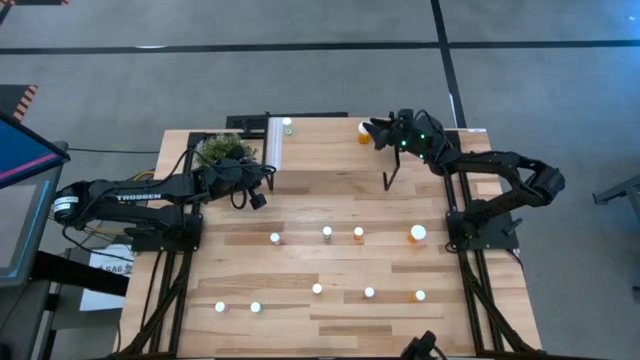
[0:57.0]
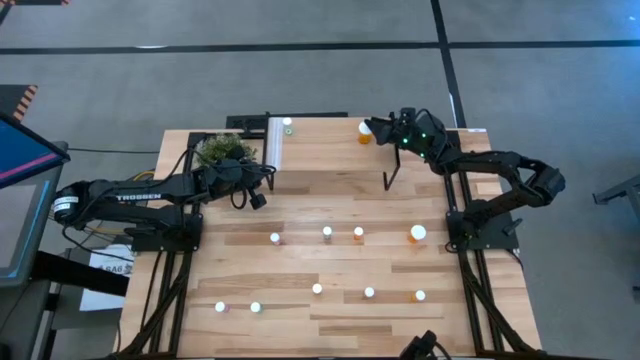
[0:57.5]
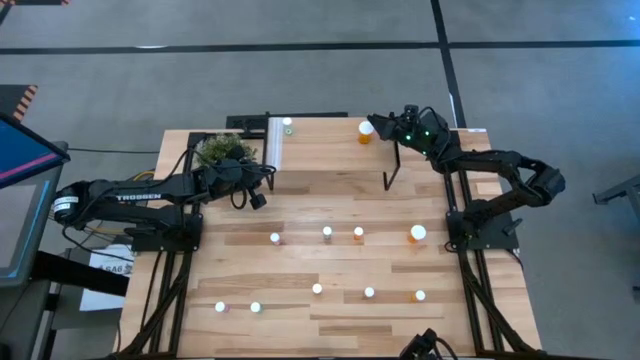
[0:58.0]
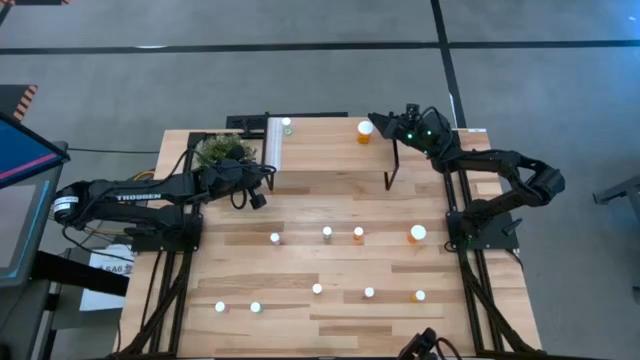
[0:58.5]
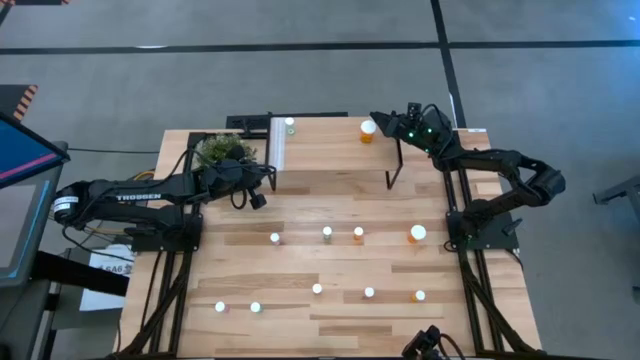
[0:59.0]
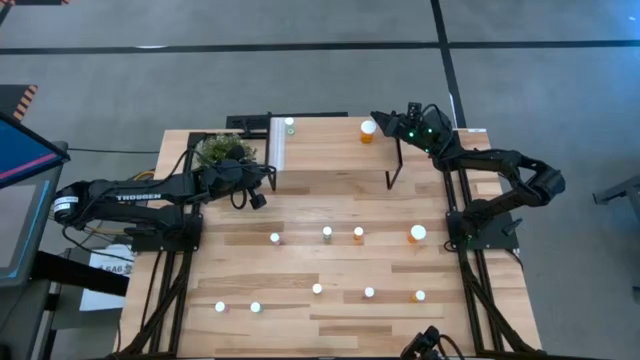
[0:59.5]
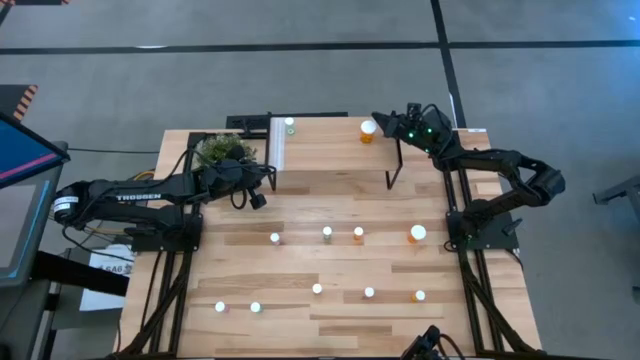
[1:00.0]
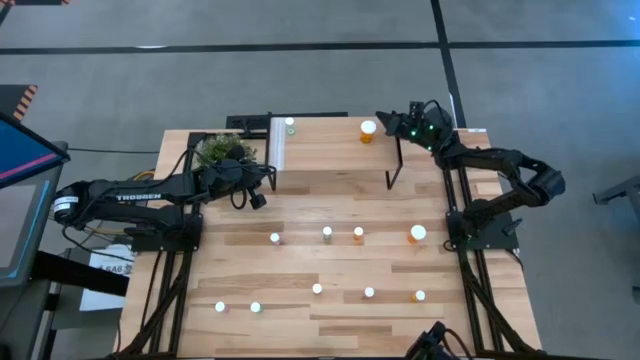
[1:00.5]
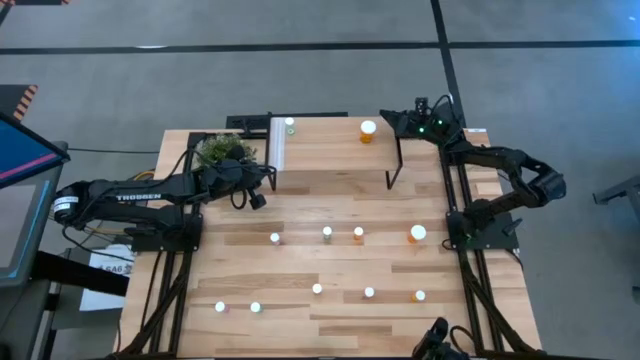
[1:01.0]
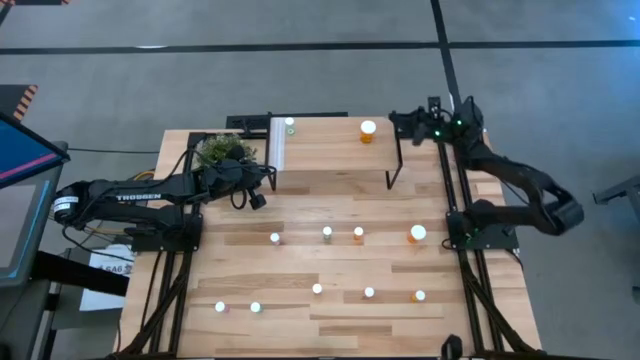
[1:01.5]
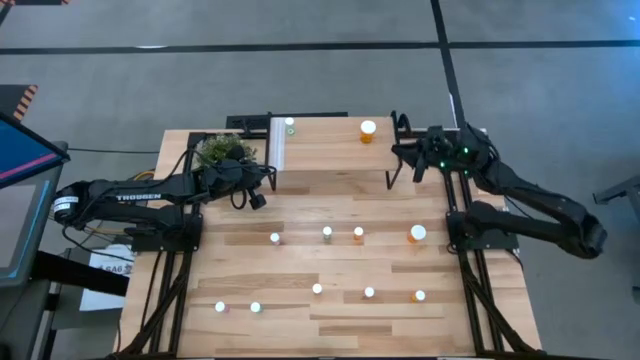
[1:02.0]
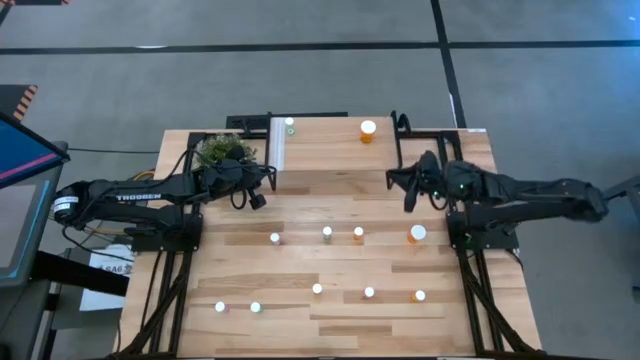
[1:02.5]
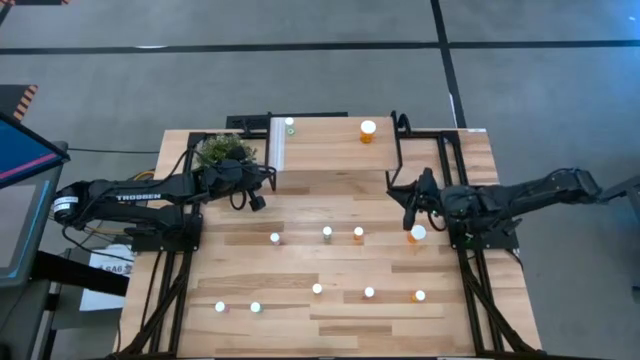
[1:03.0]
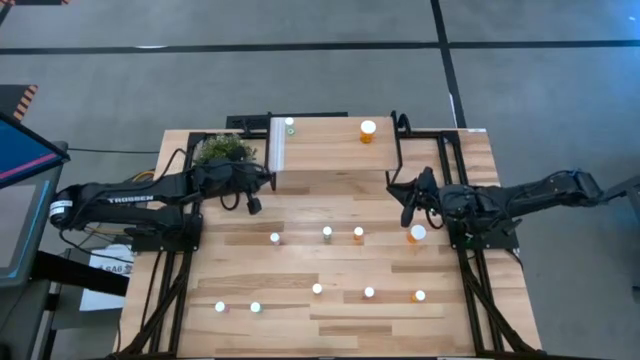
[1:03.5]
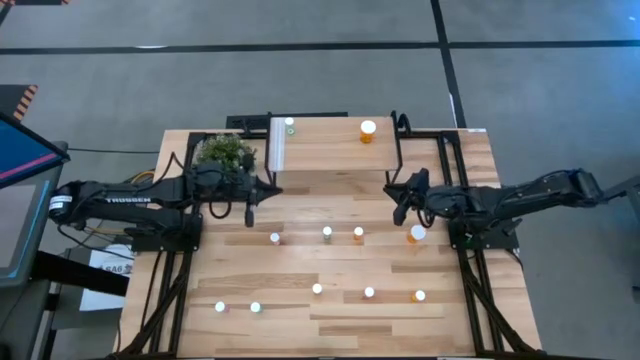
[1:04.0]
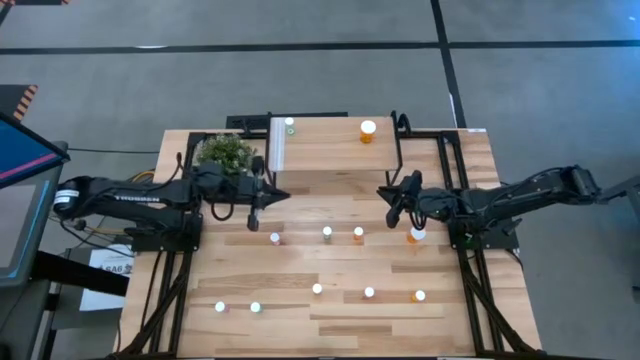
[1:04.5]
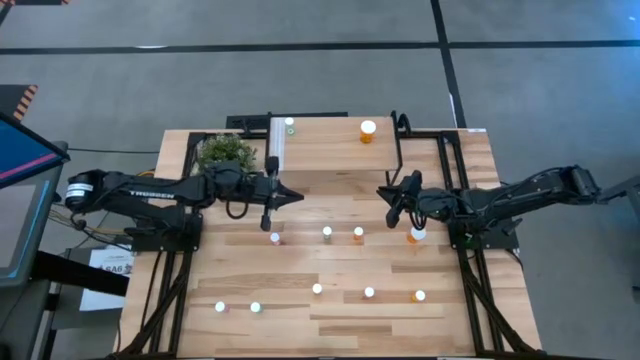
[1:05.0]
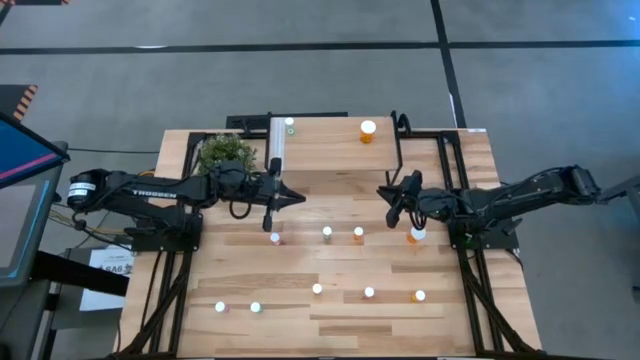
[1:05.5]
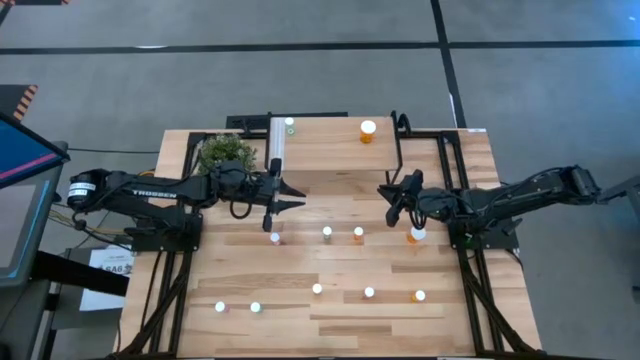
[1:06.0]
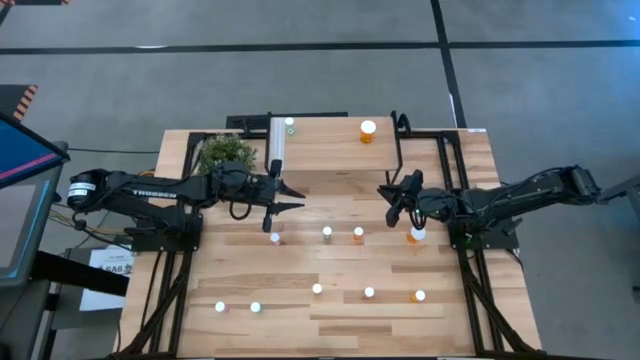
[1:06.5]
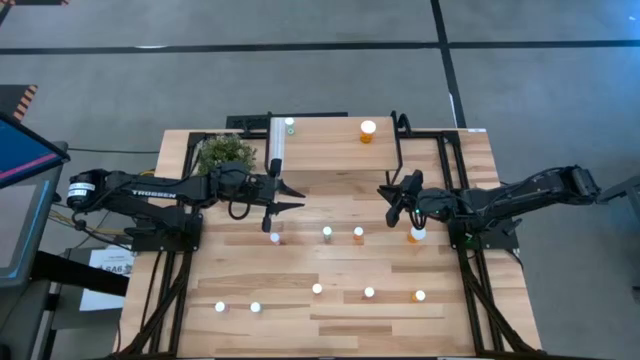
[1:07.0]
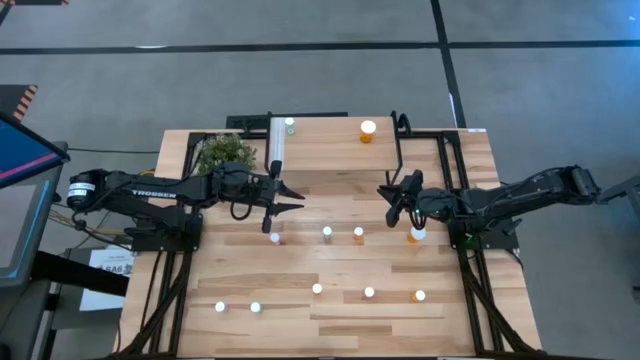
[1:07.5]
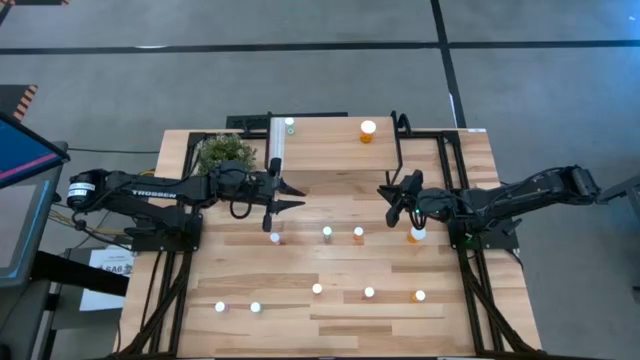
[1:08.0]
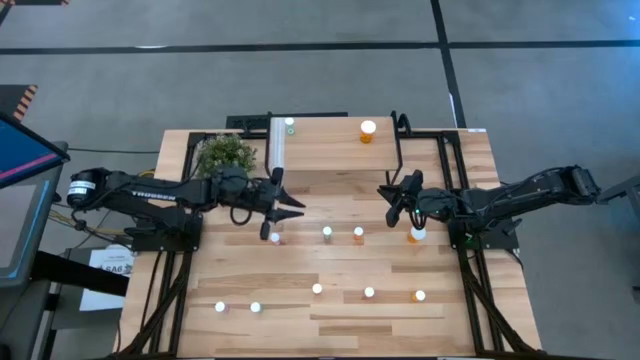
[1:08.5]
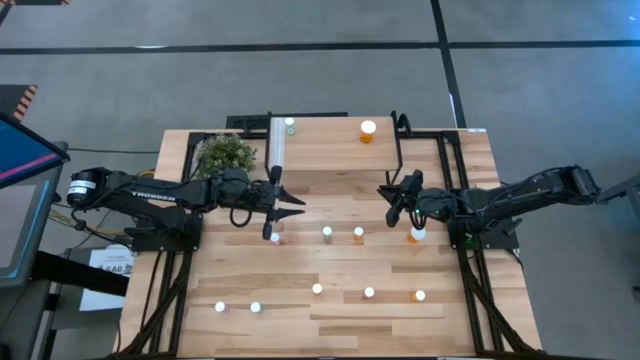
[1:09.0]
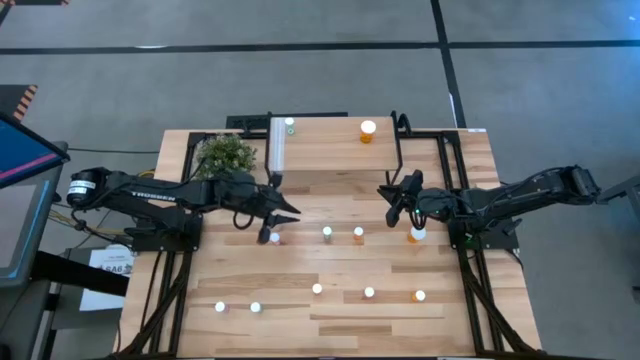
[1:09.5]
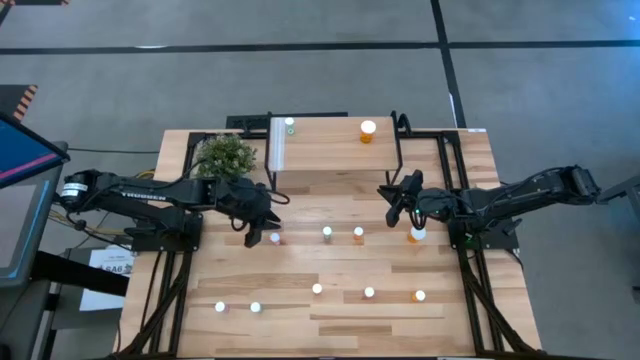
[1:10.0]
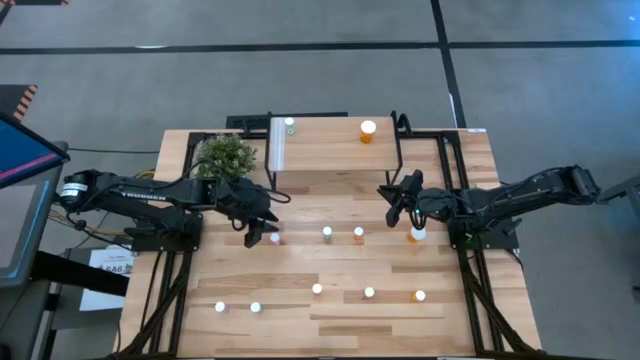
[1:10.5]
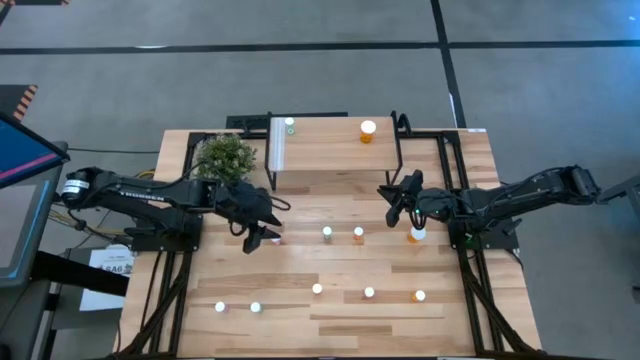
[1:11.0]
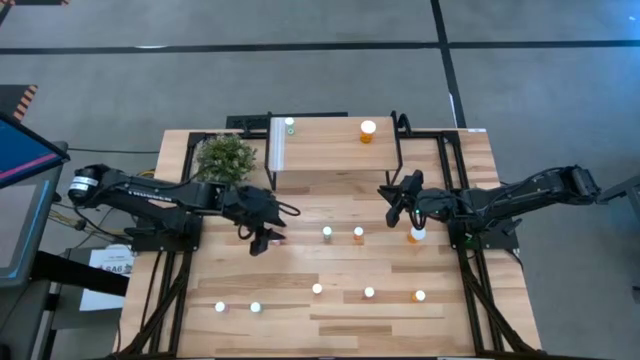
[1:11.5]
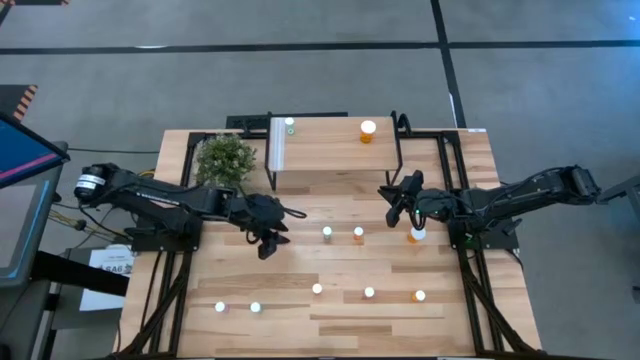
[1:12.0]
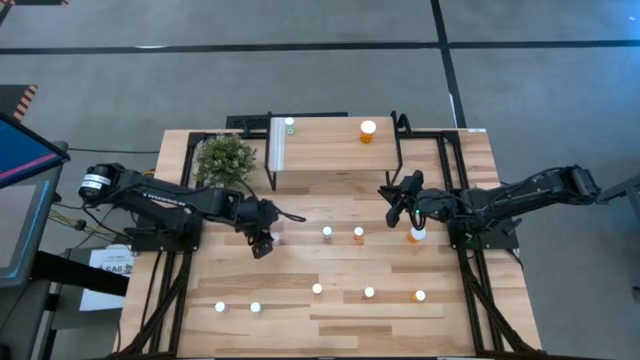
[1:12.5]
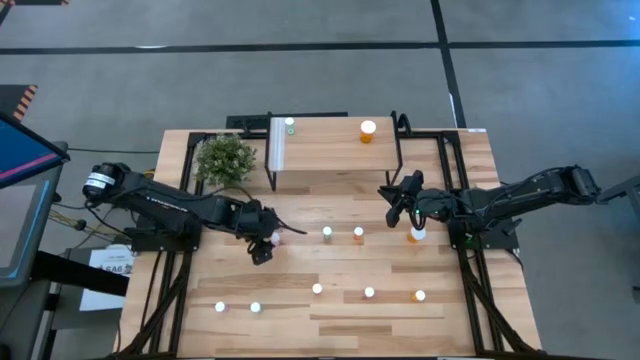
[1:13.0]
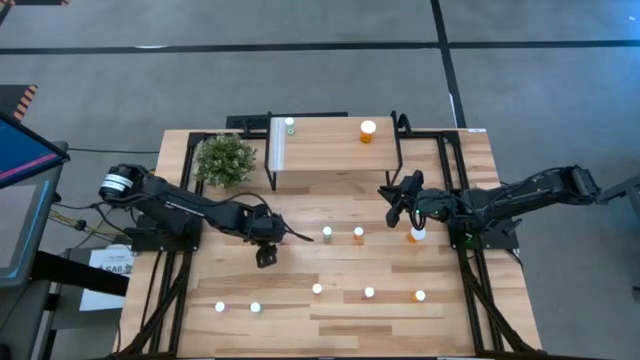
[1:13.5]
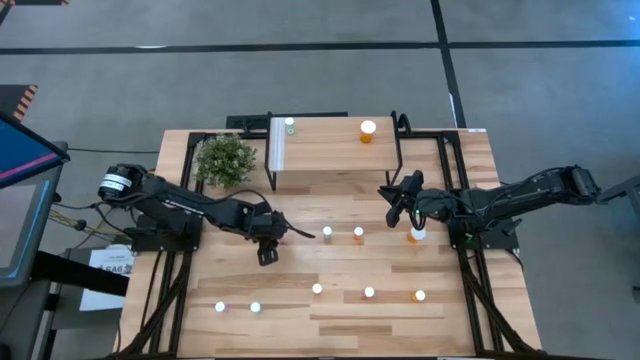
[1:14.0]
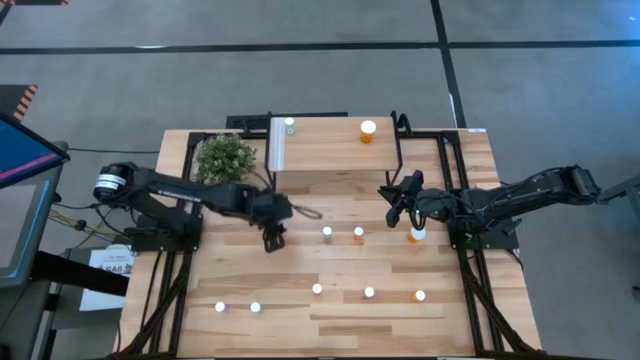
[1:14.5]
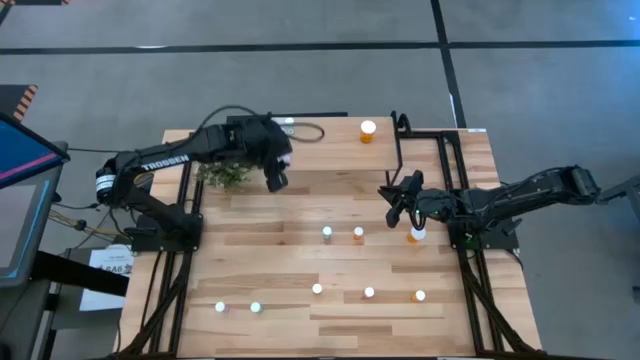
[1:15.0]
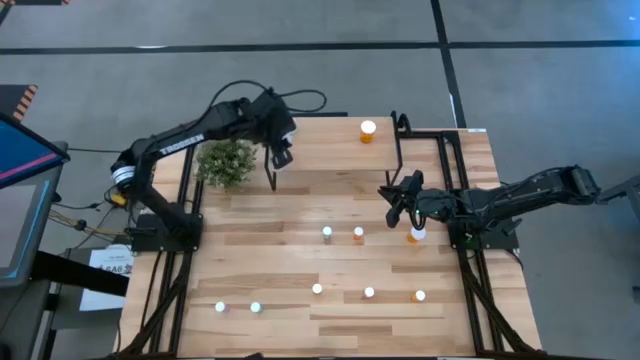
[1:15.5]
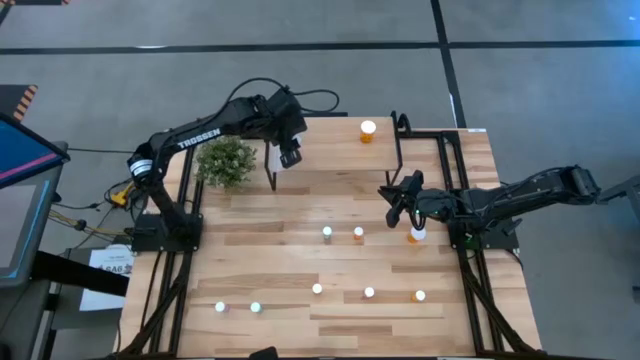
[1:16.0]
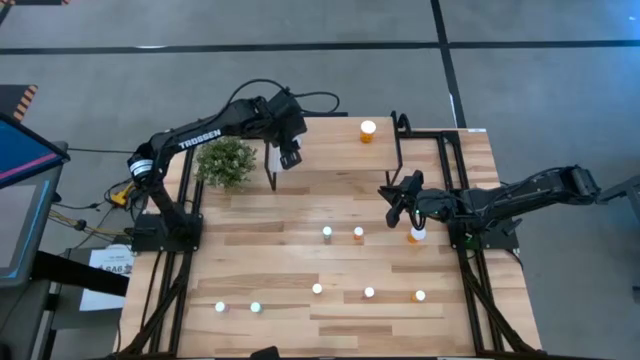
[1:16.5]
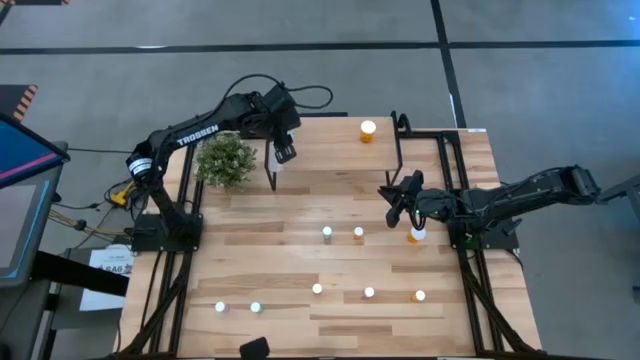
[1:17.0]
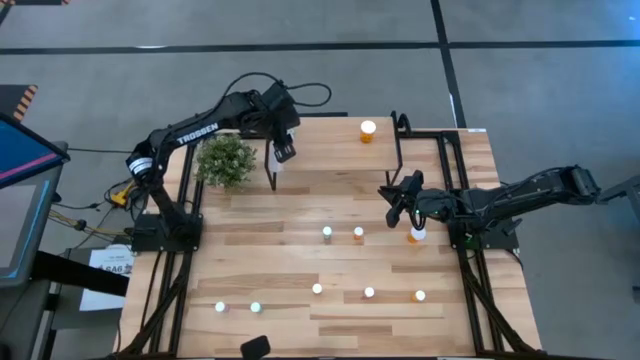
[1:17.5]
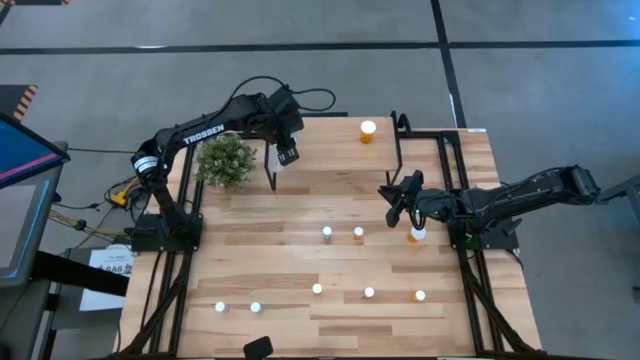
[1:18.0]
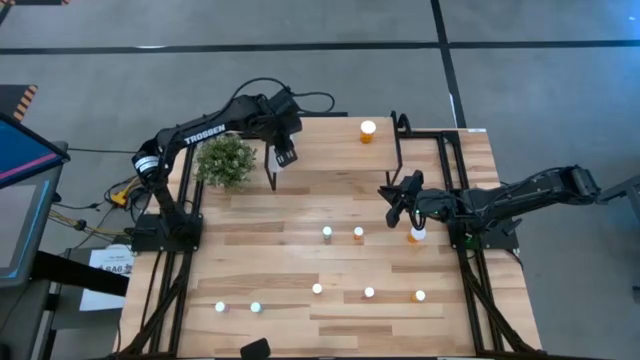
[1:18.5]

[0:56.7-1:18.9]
Task: Pick and place medicine bottles onto shelf by color
Put the top pink small pill bottle on the shelf
